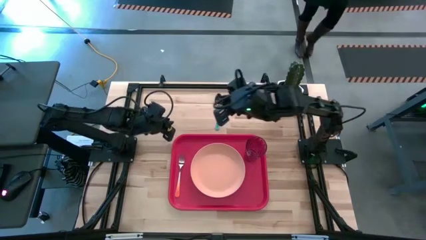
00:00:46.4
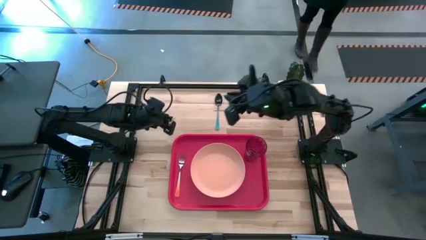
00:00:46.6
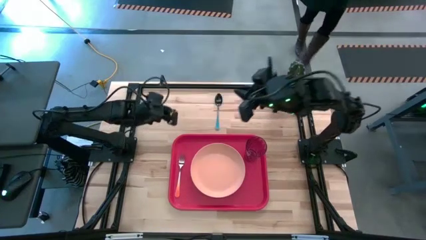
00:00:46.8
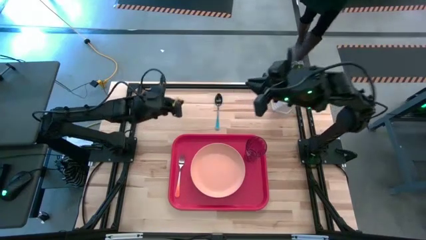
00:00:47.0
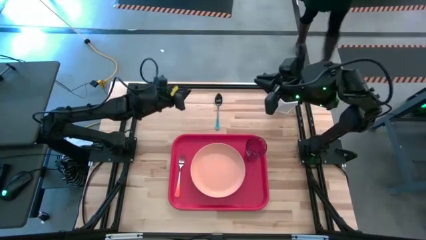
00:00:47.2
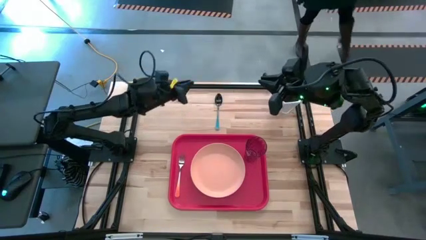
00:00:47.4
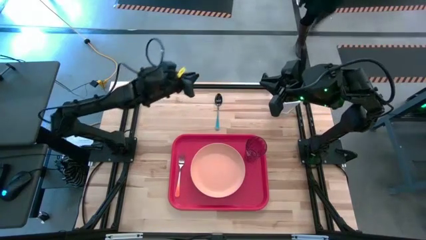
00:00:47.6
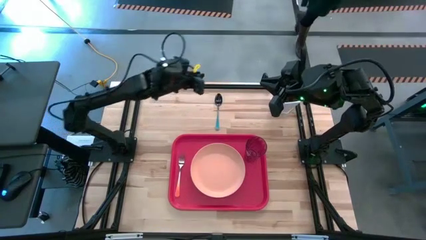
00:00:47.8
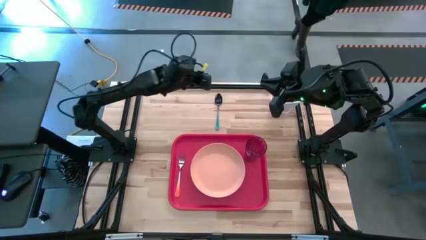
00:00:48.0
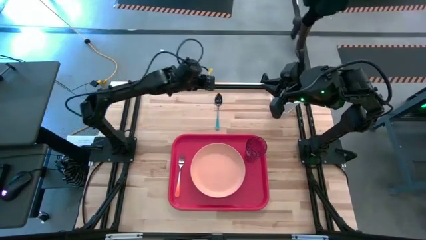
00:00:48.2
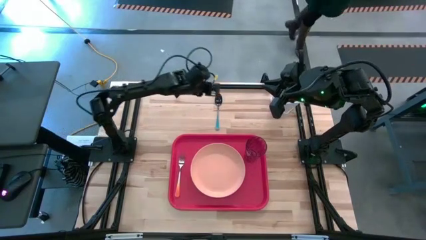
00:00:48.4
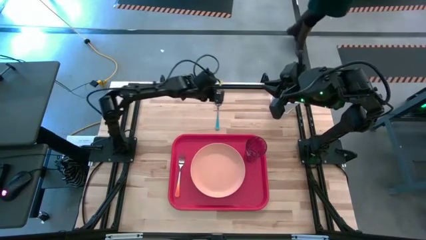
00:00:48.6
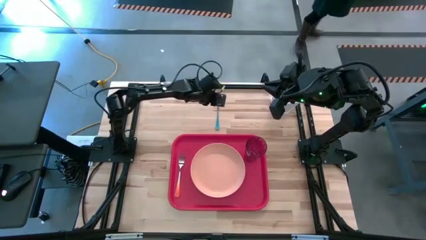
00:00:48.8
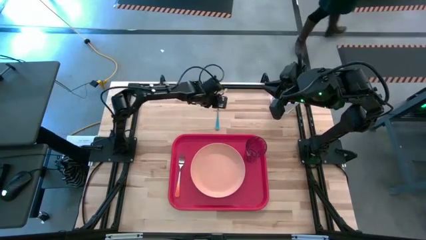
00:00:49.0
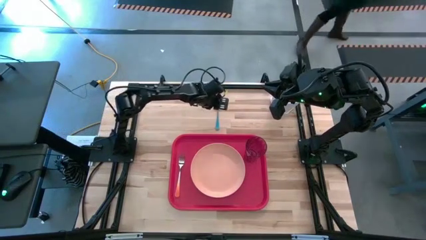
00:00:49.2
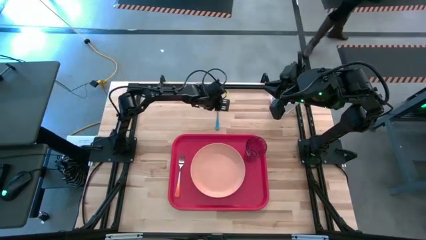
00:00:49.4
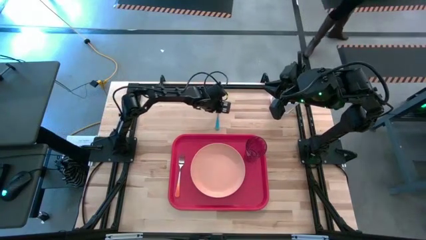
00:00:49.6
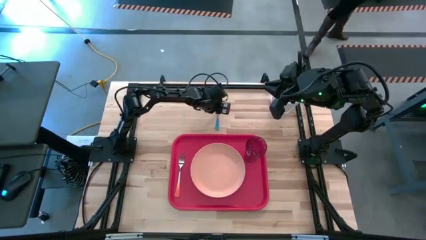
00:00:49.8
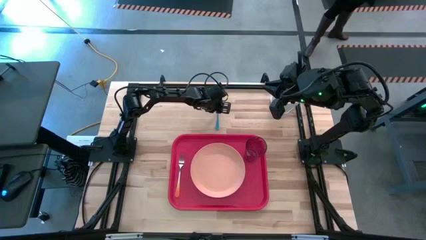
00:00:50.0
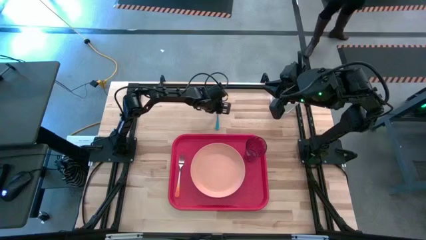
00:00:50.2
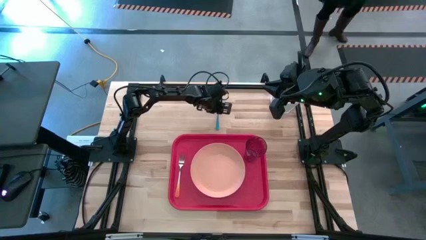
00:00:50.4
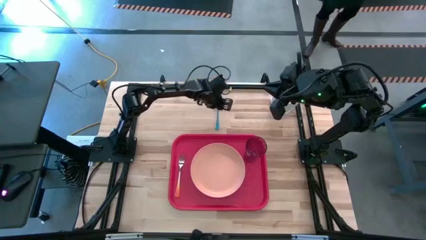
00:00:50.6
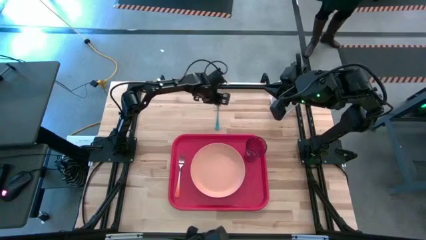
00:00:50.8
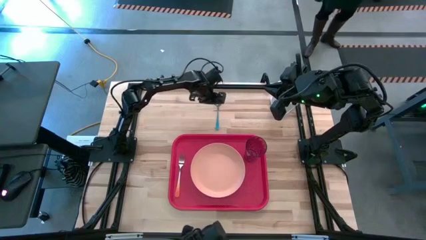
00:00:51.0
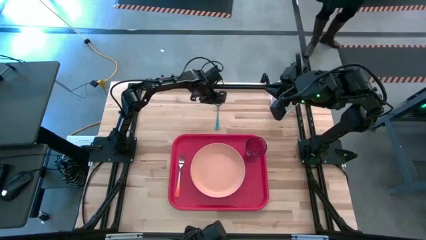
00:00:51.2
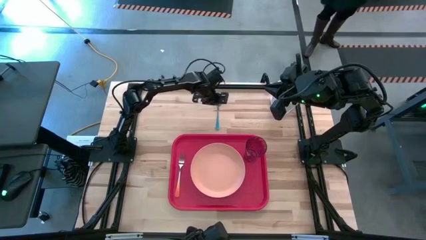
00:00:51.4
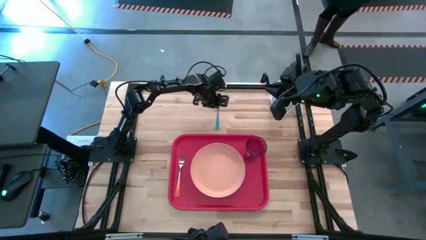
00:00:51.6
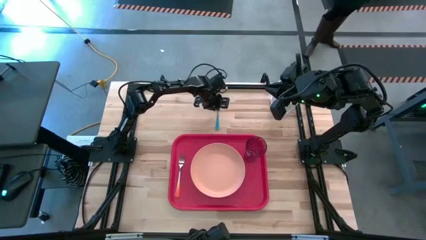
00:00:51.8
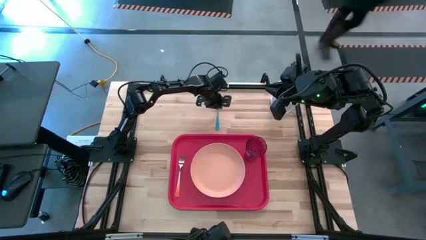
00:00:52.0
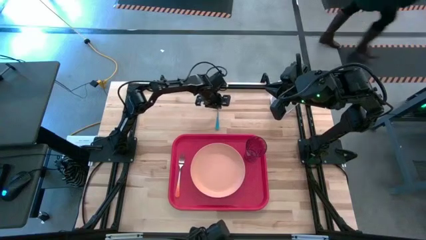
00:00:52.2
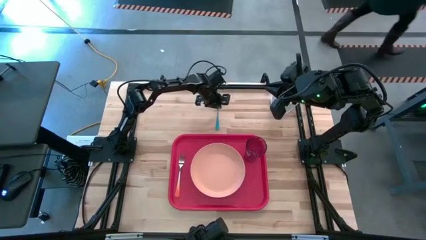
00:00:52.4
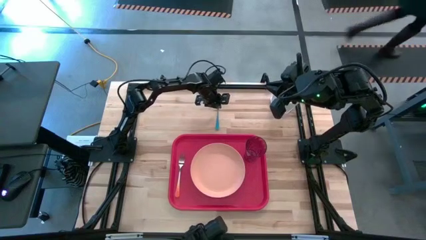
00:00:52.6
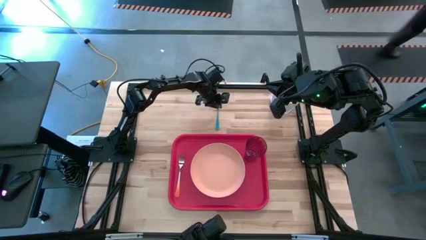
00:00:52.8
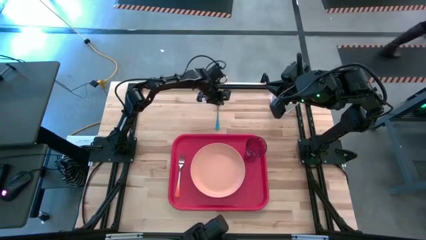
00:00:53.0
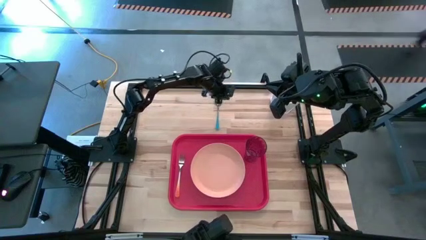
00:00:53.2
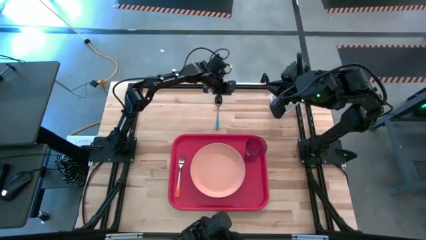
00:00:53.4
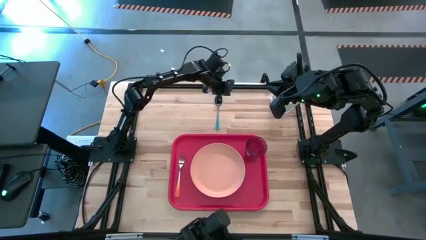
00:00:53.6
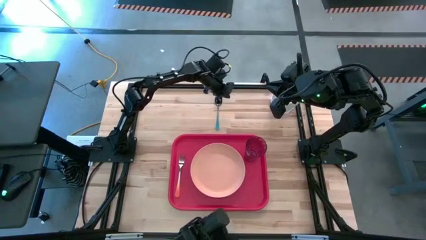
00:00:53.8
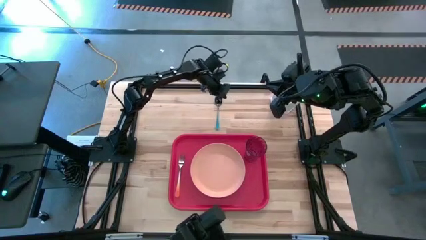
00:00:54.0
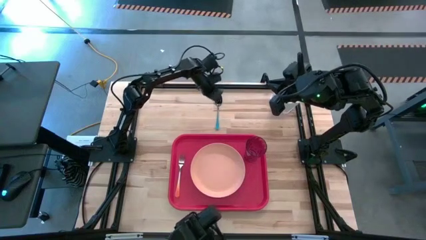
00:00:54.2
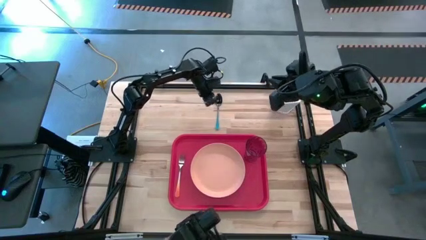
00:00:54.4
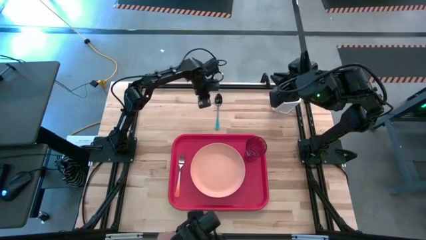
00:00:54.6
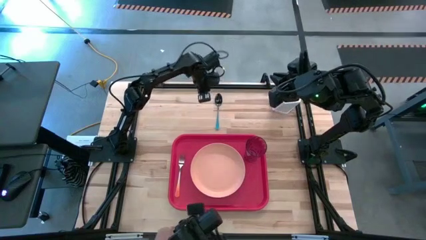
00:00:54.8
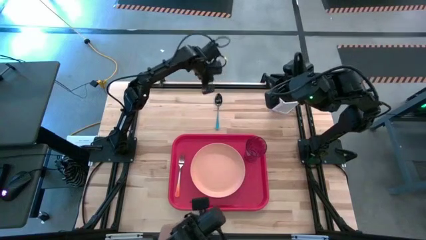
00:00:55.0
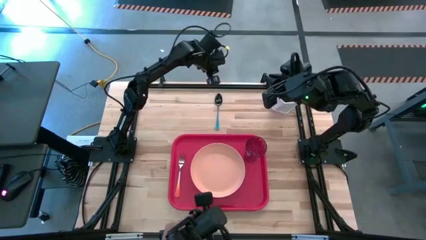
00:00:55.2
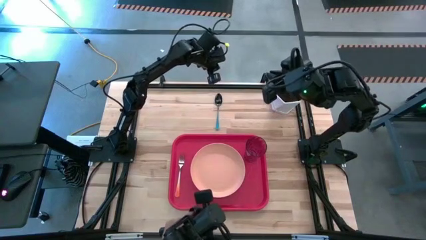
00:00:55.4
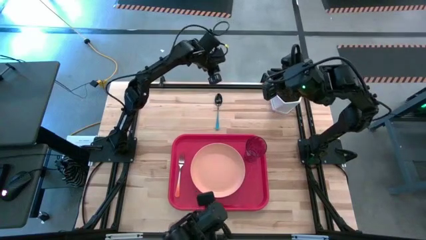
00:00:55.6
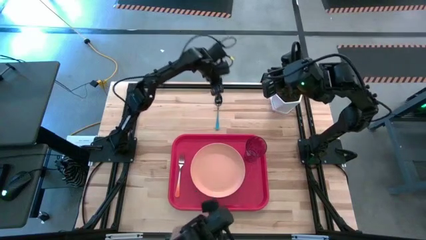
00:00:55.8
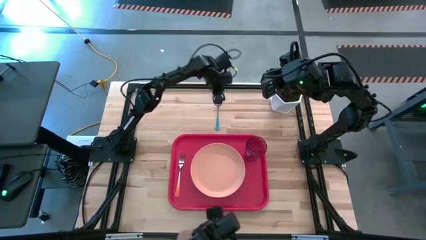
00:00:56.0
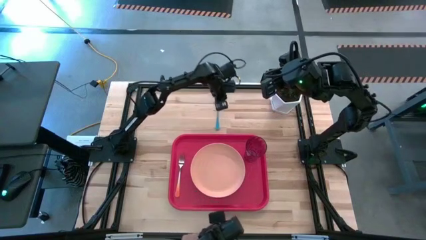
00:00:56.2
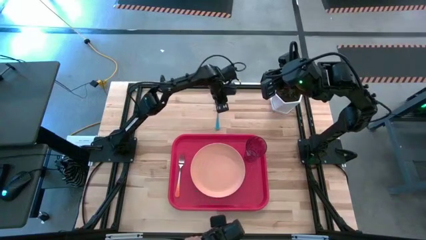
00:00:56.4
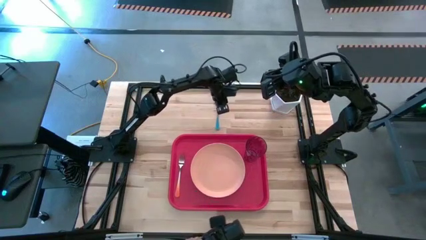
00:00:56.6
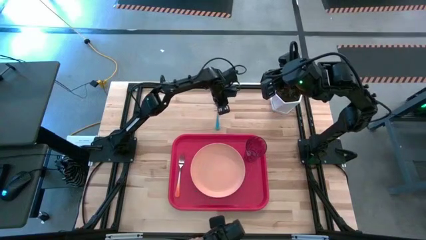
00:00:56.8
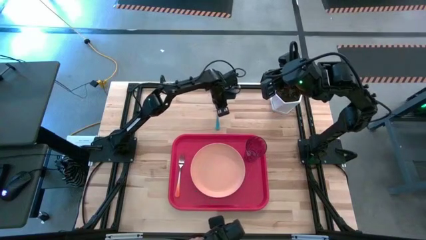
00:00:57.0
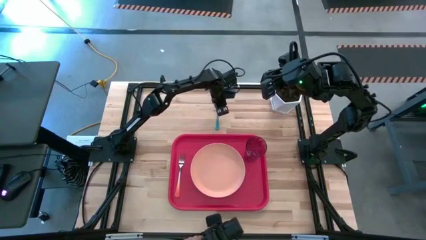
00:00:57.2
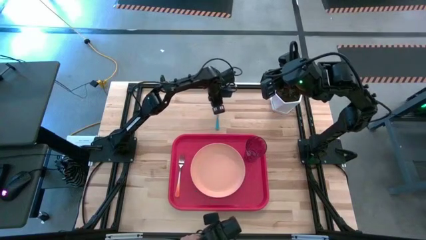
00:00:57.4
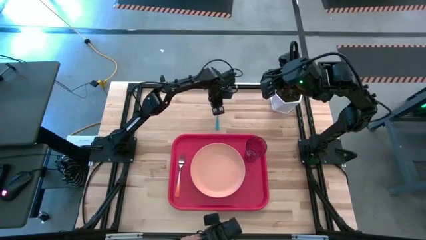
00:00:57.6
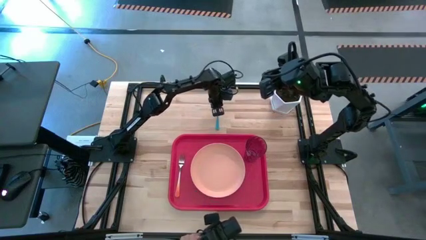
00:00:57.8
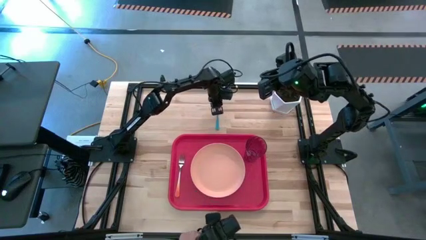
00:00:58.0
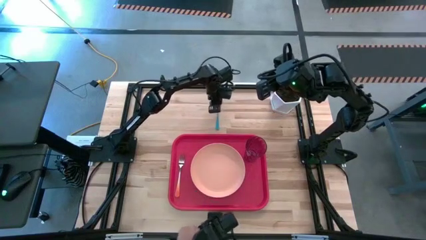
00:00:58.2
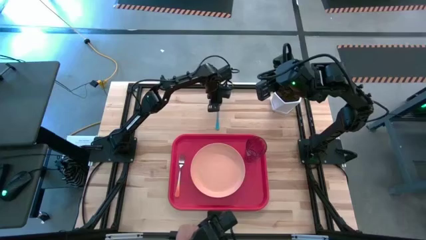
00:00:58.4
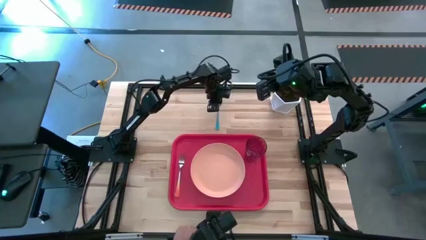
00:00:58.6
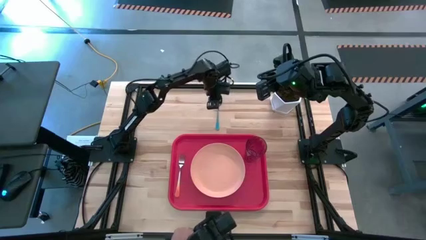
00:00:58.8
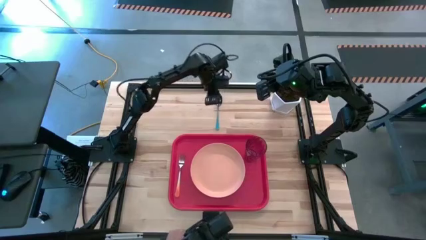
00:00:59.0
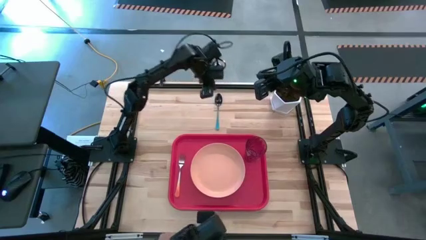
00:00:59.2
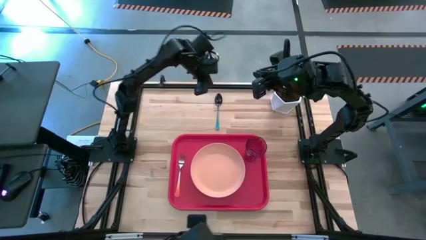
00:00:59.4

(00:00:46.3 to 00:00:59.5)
Task: Pick and place plate/cup/fork/spoon on tray
Put the blue spoon to the right of the orange fork on the red tray

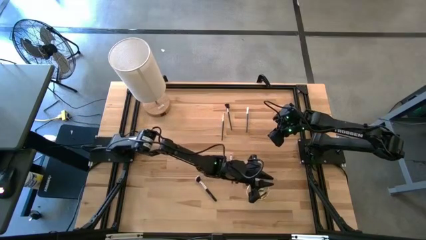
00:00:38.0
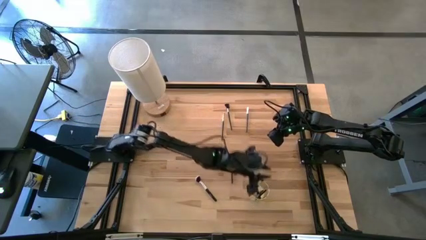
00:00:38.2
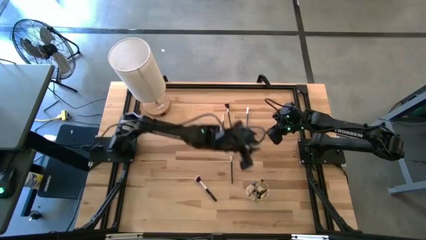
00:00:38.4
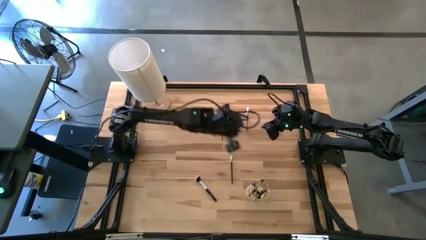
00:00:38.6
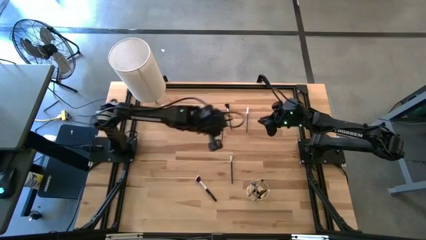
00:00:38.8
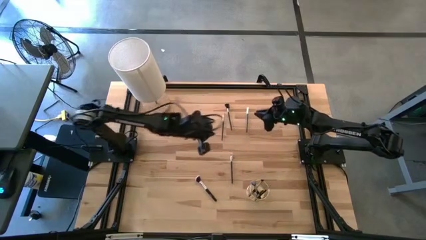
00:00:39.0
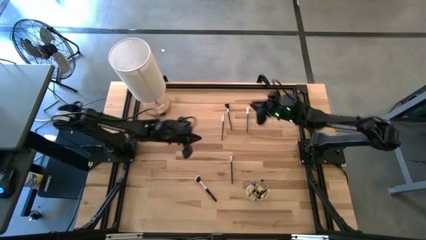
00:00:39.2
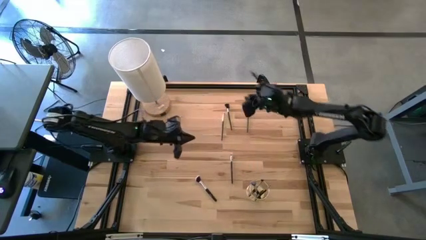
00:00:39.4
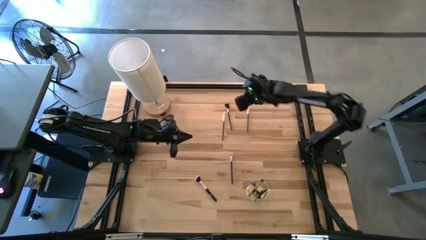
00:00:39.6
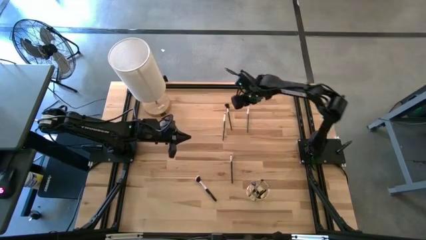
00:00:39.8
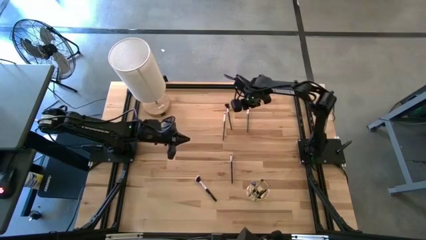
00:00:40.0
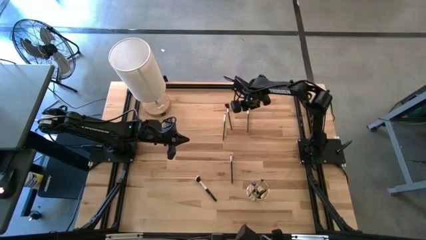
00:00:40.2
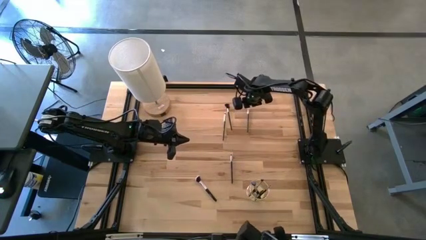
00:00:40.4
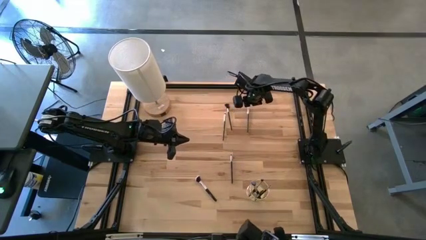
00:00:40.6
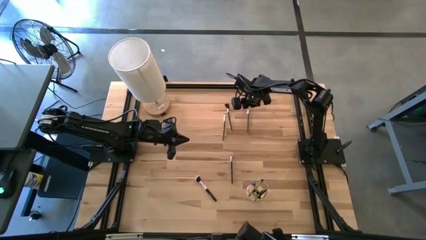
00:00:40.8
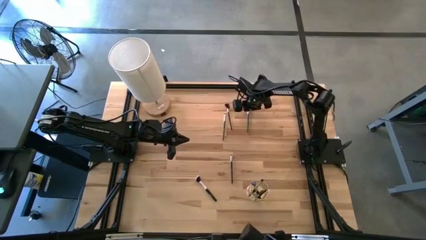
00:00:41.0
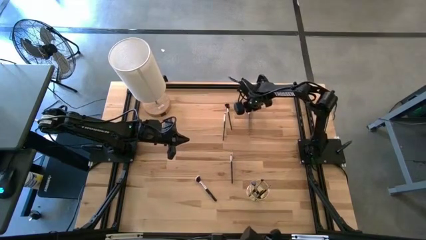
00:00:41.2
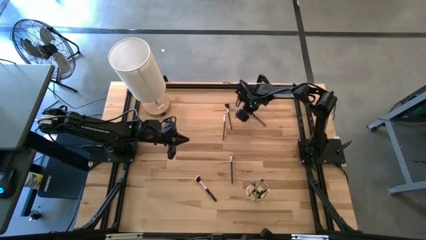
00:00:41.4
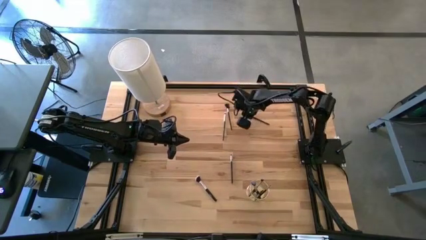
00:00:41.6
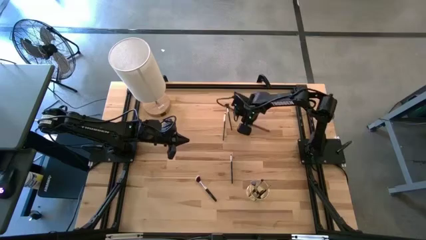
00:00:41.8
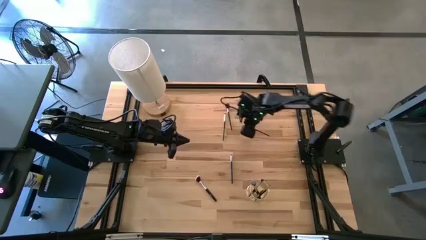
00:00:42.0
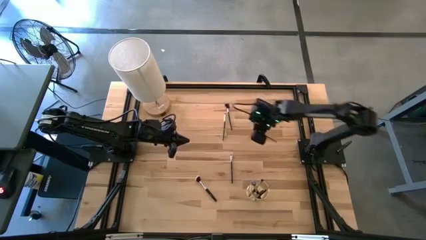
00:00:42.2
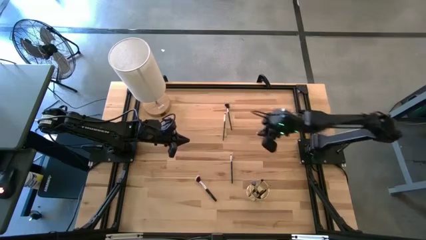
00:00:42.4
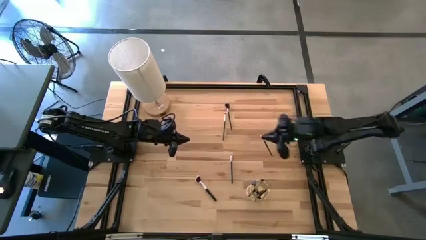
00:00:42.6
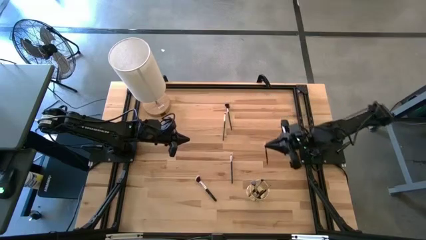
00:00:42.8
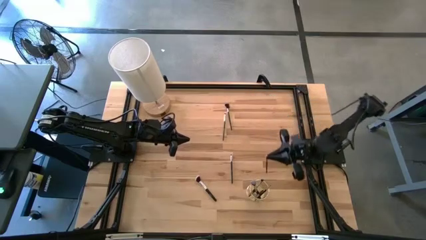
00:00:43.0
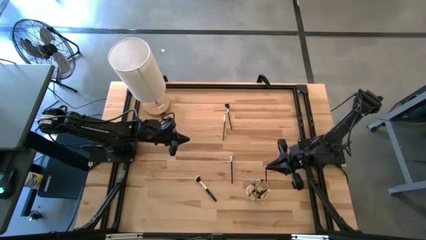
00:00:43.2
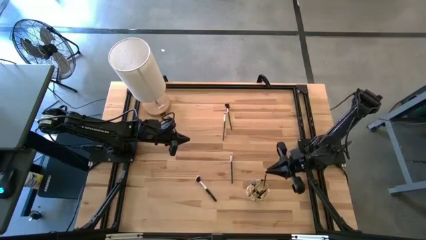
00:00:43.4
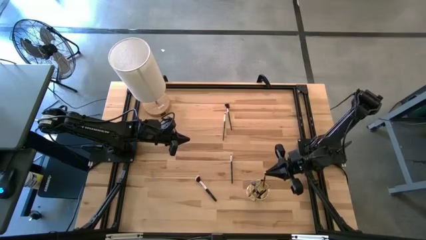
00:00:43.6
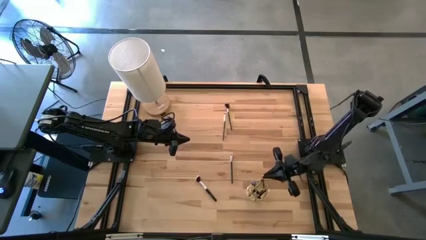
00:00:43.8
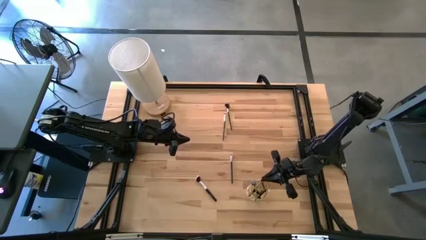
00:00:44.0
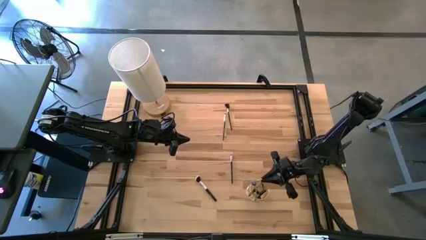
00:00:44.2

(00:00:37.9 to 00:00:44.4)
Task: Pick & Place Makeup Brushes
Put the eyeshadow brush into the makeup holder
